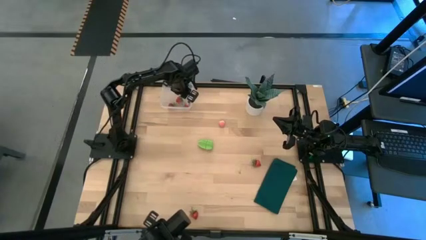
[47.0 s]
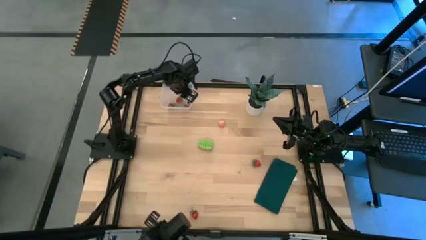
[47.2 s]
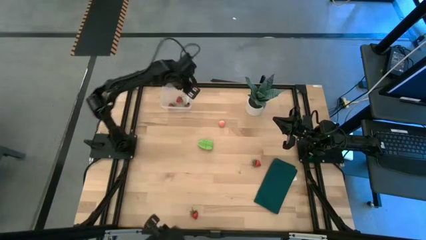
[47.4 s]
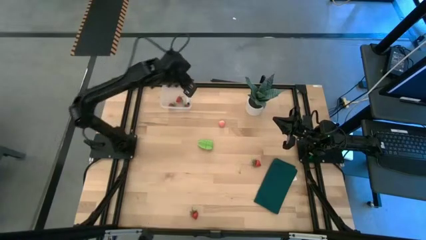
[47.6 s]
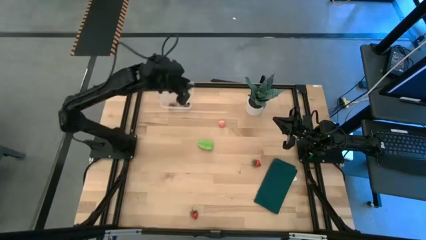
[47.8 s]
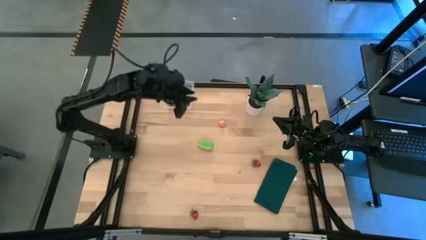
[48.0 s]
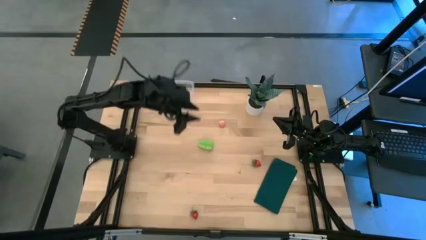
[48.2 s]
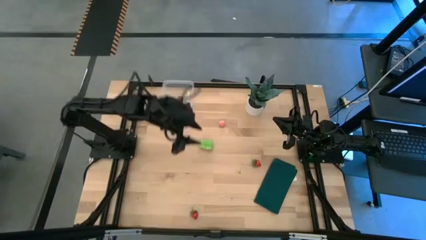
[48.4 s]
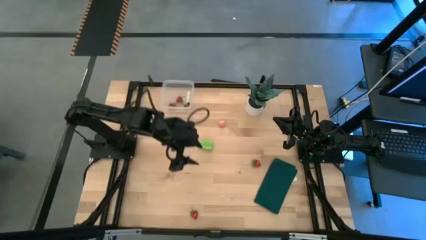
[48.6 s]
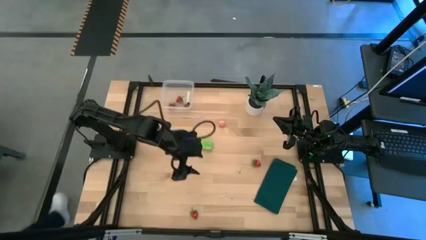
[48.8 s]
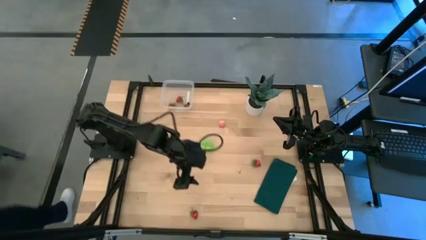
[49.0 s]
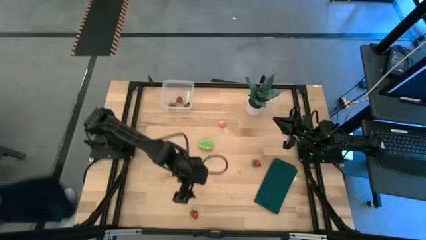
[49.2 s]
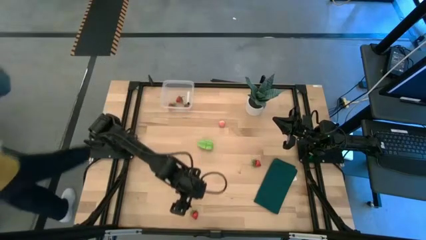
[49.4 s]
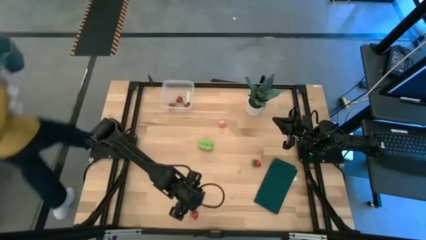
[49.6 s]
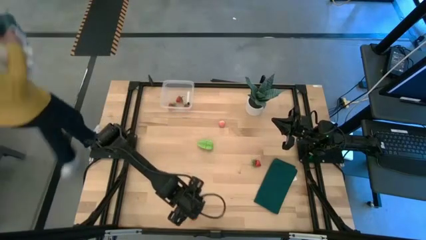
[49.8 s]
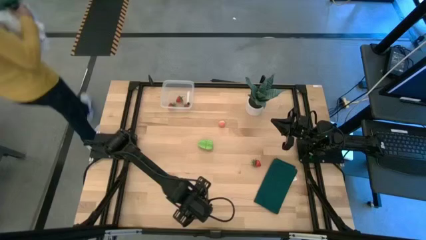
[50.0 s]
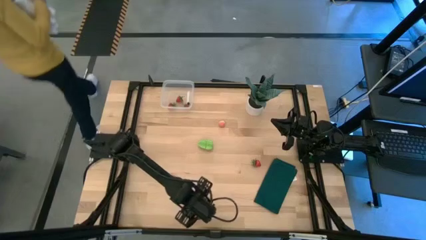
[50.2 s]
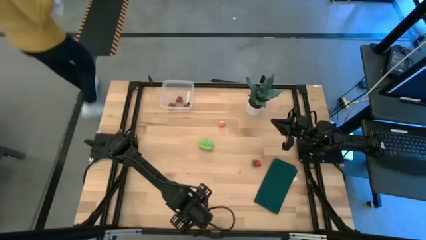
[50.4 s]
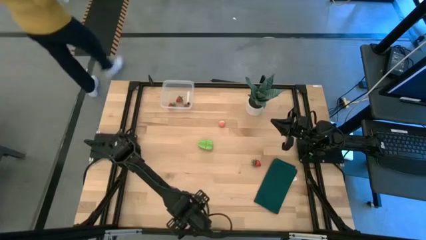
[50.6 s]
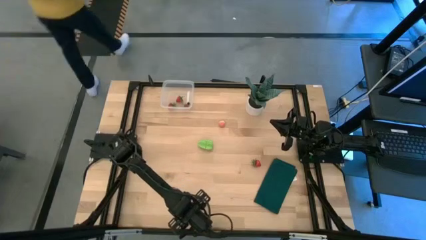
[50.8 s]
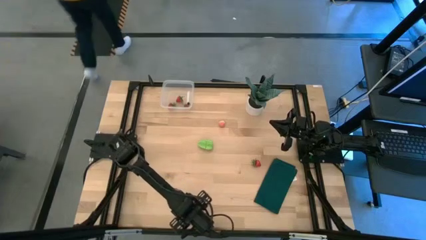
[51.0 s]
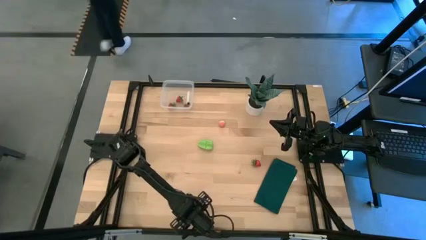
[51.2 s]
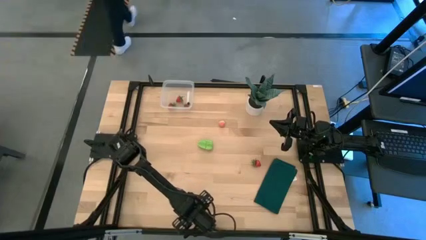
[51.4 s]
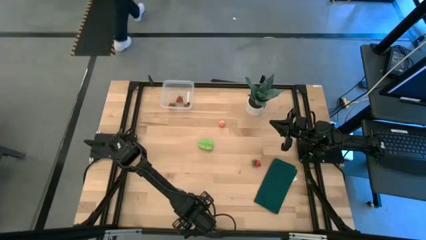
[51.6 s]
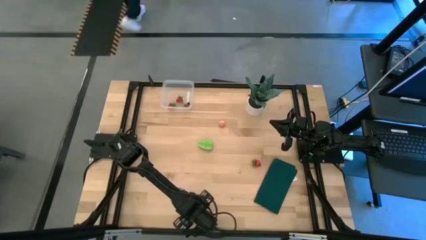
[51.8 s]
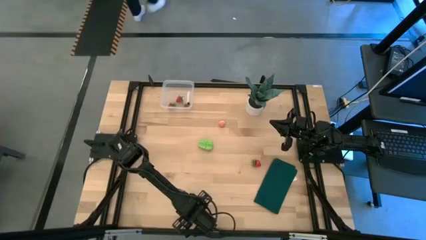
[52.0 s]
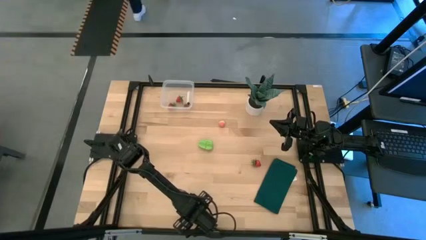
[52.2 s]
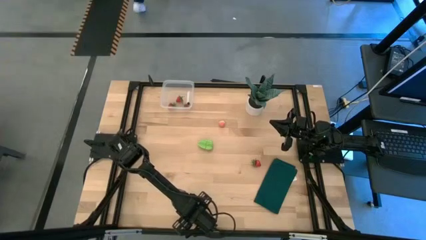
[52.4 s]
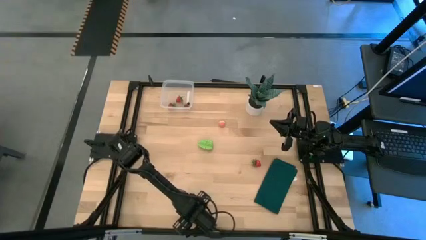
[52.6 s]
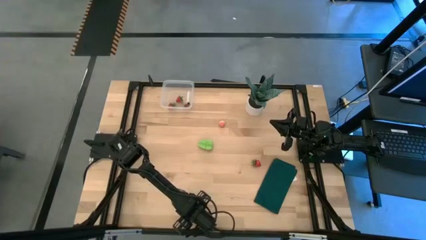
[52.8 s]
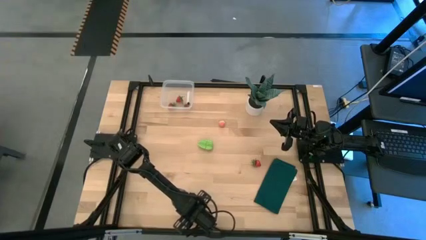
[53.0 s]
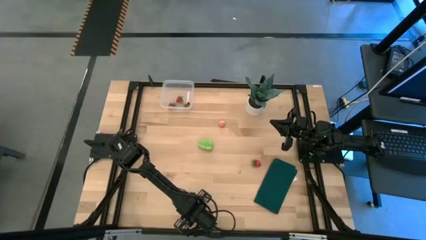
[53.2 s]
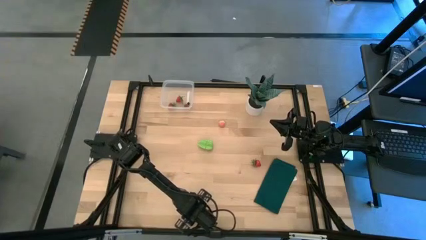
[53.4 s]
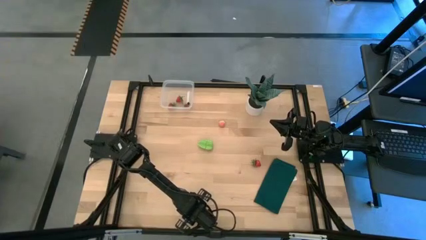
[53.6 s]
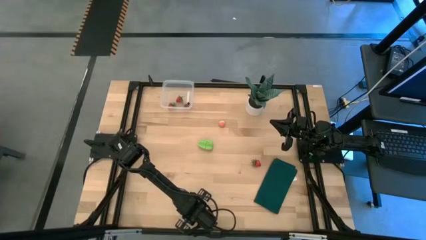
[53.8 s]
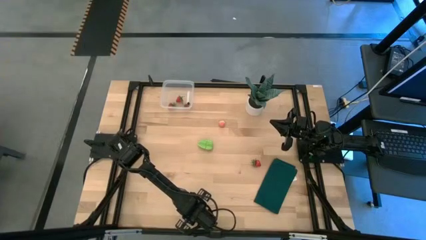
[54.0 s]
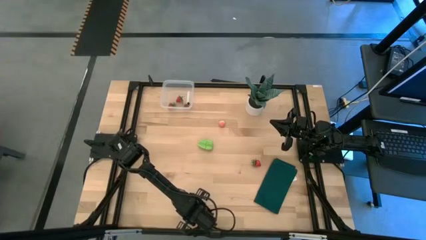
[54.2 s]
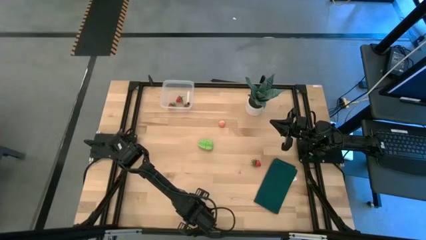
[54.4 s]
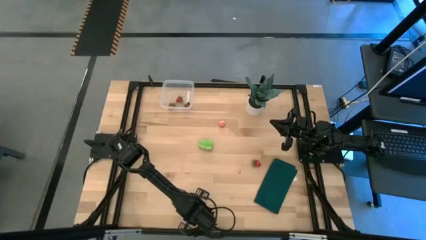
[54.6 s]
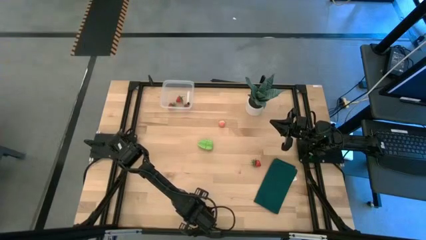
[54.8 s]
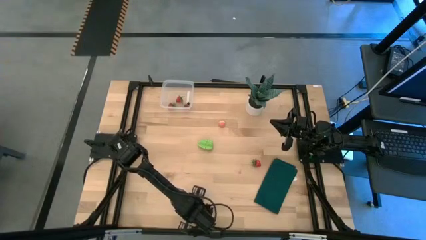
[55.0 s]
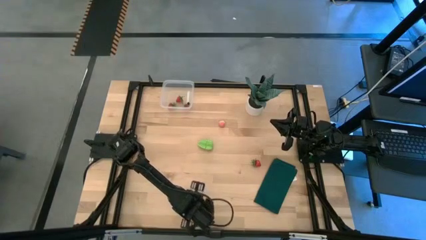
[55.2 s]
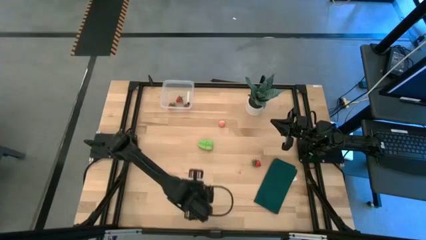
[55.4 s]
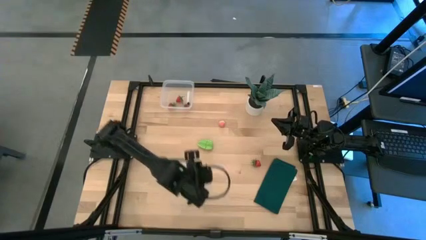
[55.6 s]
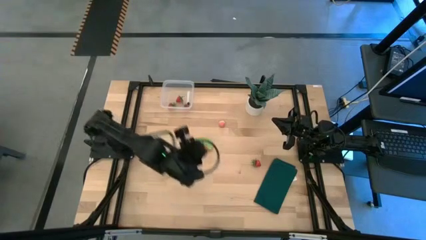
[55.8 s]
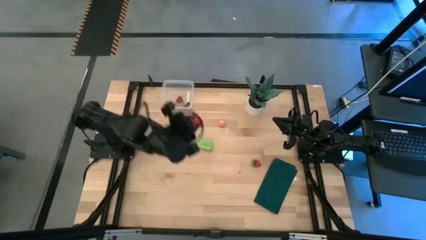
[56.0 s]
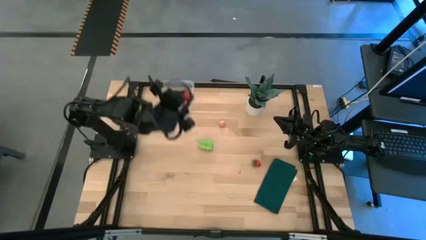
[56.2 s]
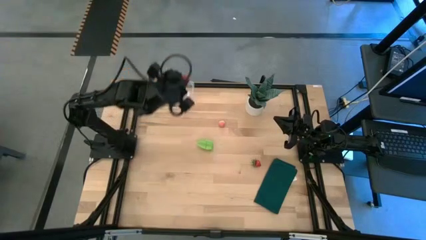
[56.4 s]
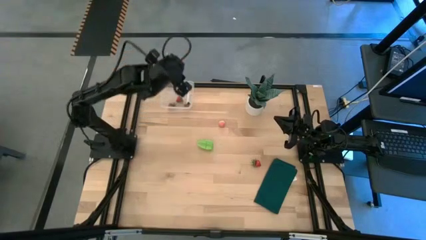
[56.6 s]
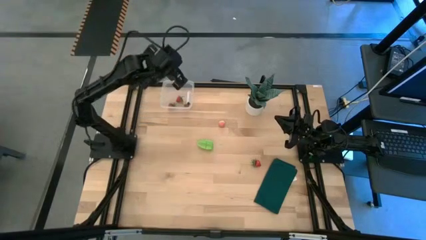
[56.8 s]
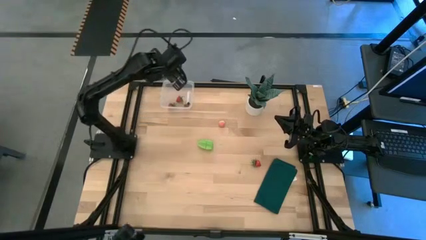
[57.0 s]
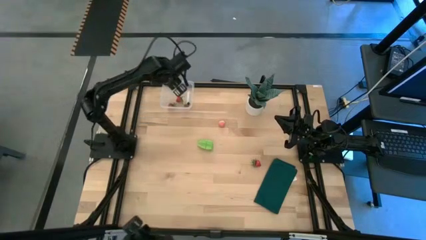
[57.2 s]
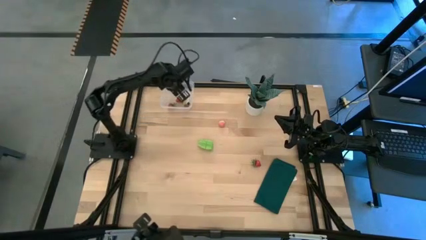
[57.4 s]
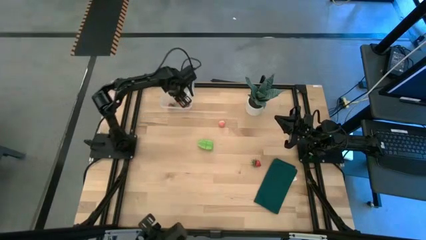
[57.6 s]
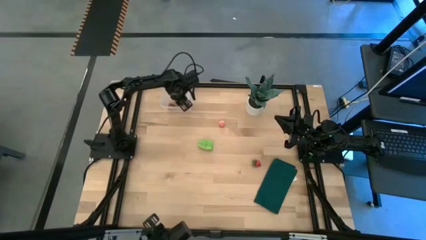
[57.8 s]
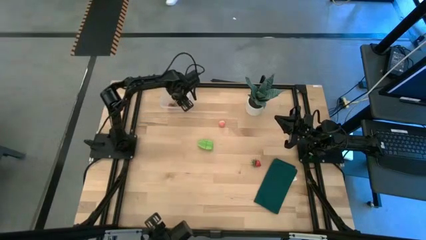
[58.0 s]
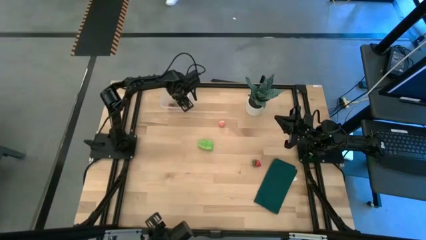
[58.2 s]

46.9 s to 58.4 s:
Task: Pick and placing Produce into tupperware
Put the red strawberry into the transparent container

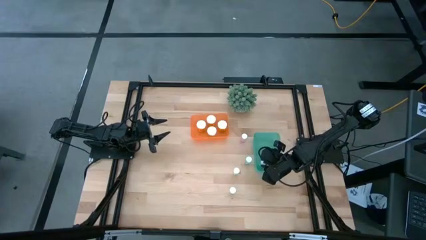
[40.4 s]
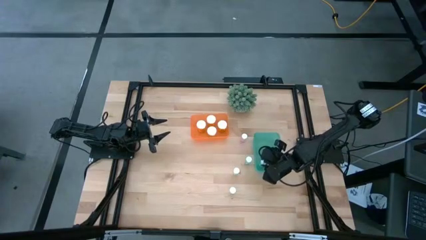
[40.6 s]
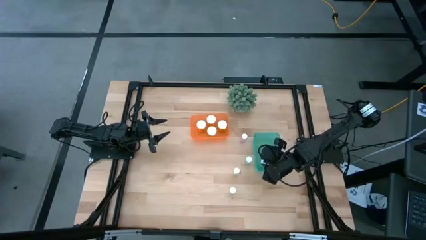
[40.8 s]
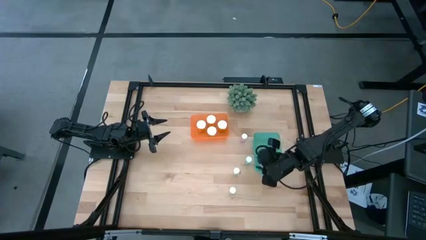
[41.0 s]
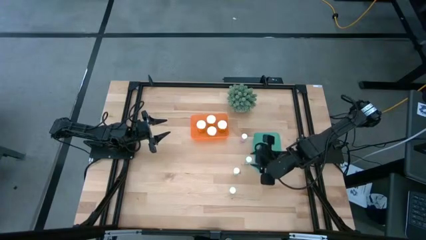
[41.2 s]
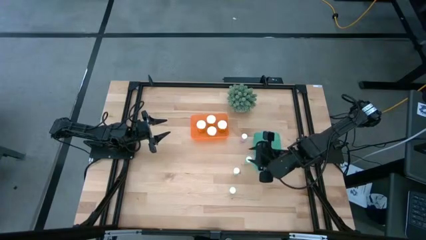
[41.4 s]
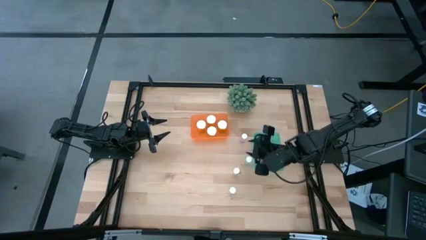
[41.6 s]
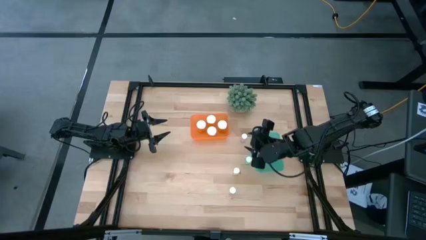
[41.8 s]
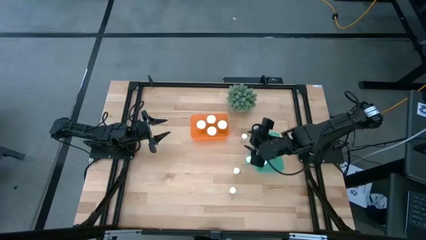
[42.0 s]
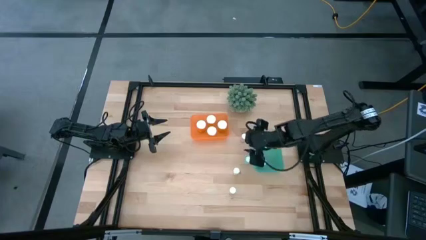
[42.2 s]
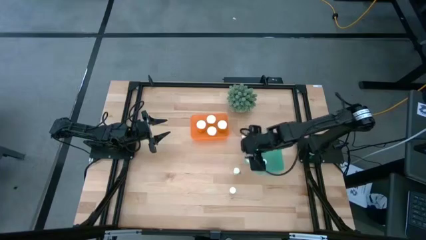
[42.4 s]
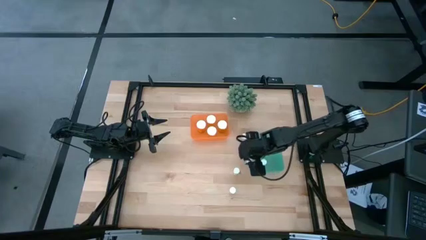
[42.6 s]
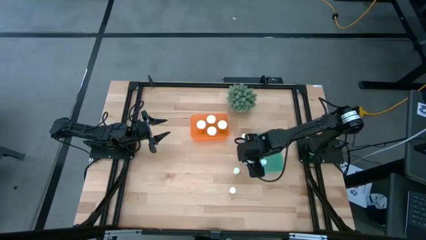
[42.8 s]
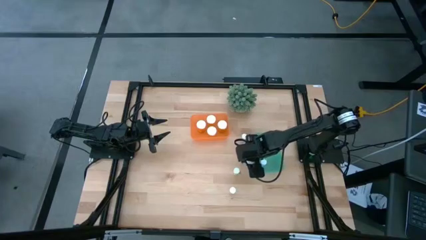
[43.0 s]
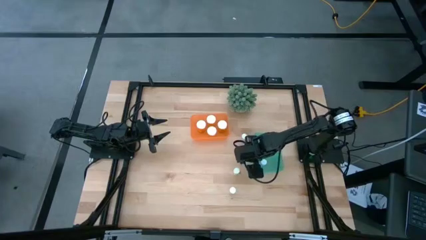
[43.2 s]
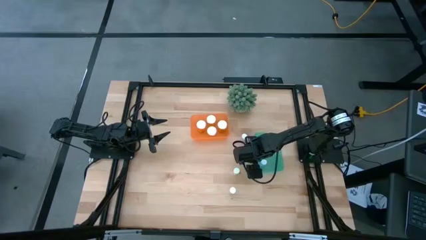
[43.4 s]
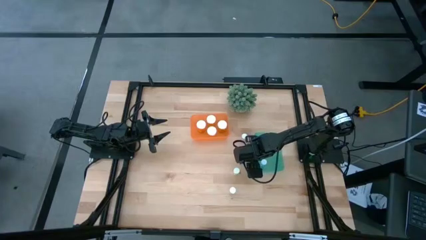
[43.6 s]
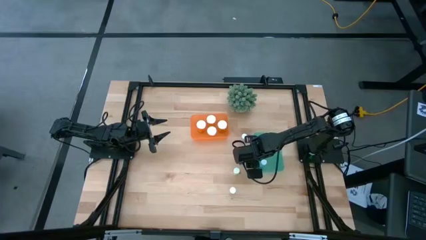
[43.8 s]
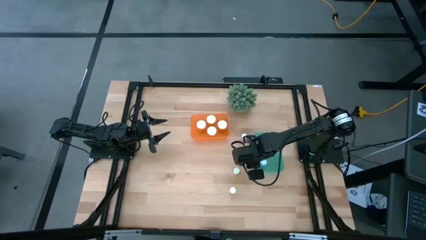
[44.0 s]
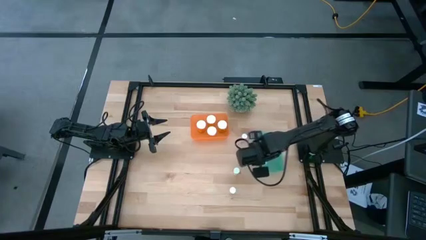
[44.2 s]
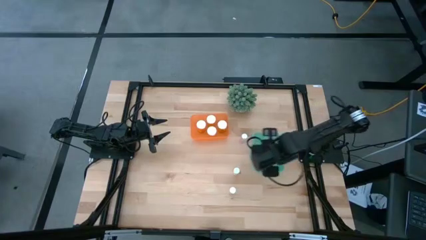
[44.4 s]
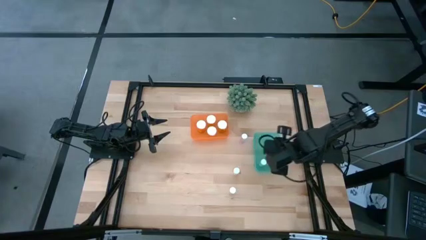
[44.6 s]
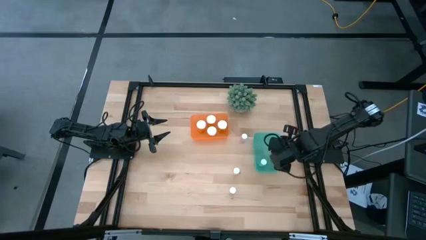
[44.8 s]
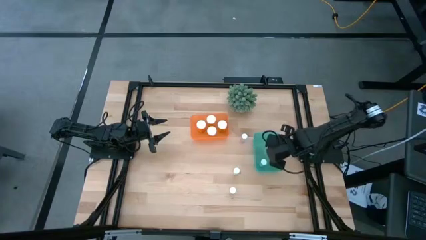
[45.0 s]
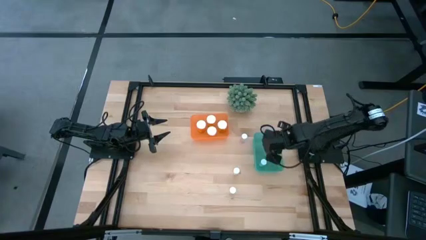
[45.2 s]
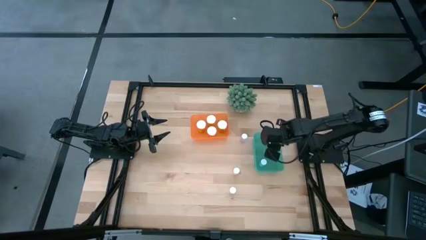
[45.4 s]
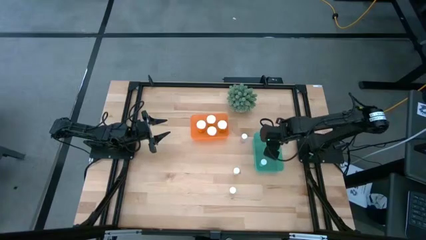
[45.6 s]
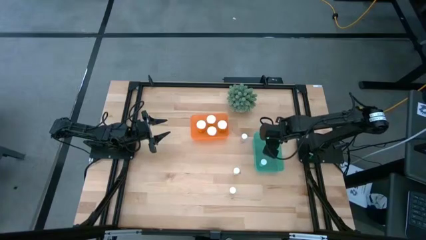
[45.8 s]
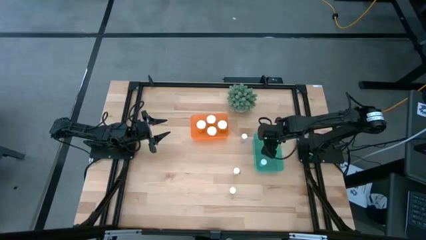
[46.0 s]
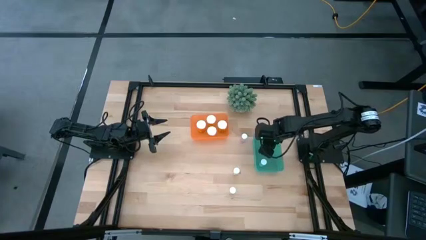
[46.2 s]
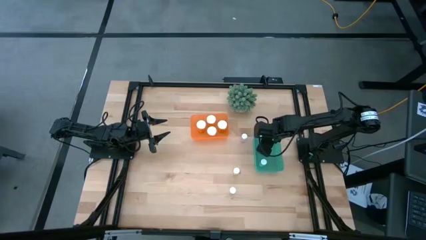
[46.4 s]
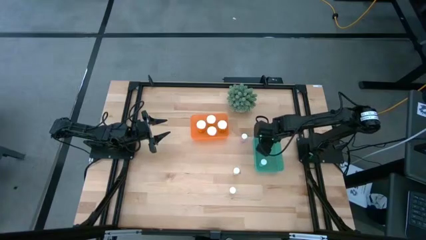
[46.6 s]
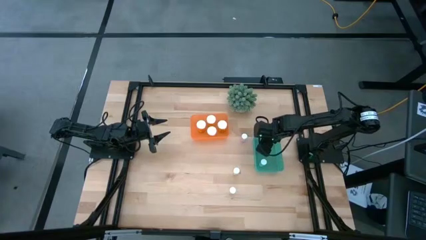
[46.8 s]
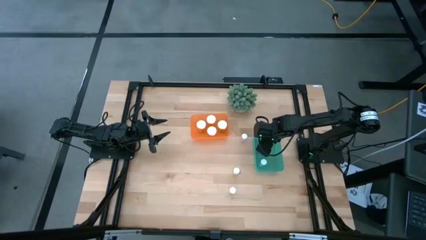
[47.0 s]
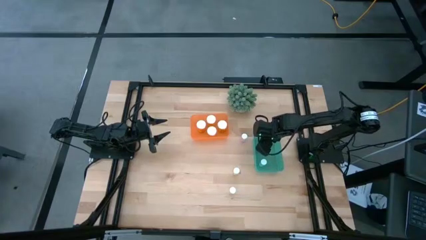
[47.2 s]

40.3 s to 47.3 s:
Task: Pick and place medicine bottles into bin by pill shape (circle, oval)
Put the blue pill bottle into the blue bin
